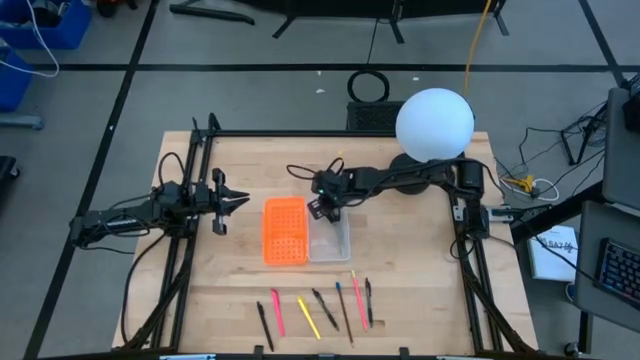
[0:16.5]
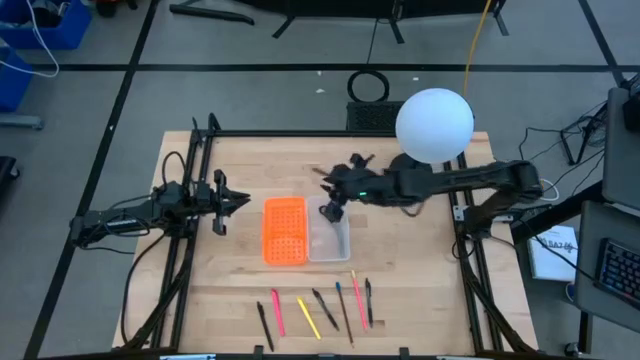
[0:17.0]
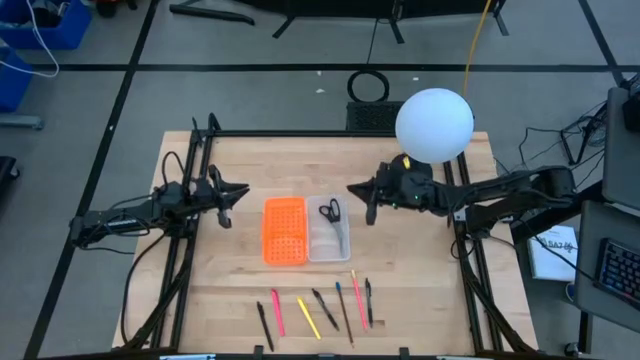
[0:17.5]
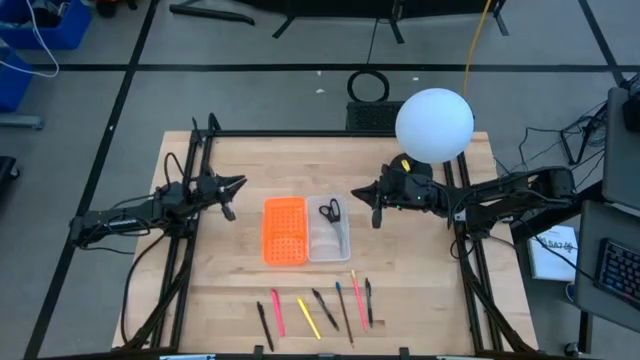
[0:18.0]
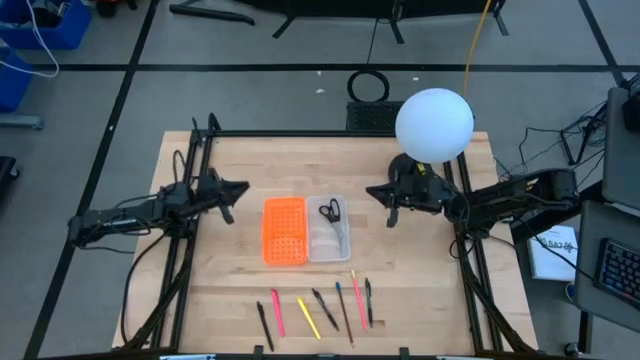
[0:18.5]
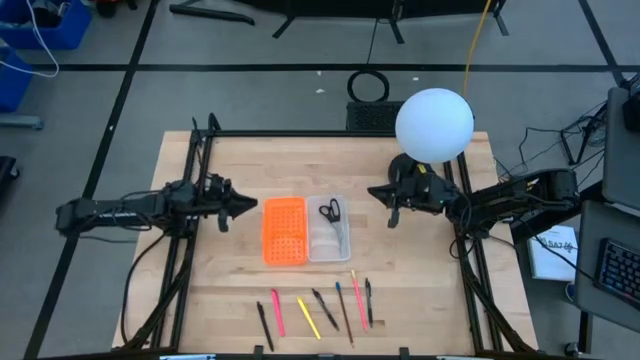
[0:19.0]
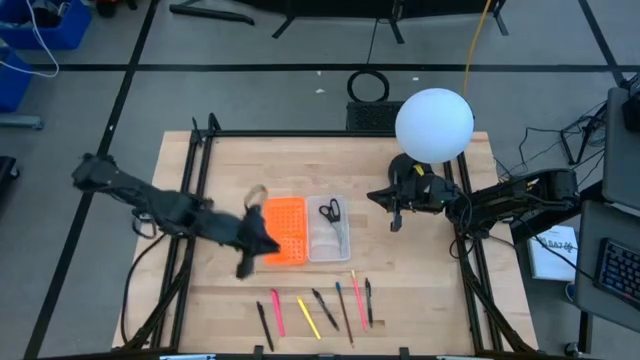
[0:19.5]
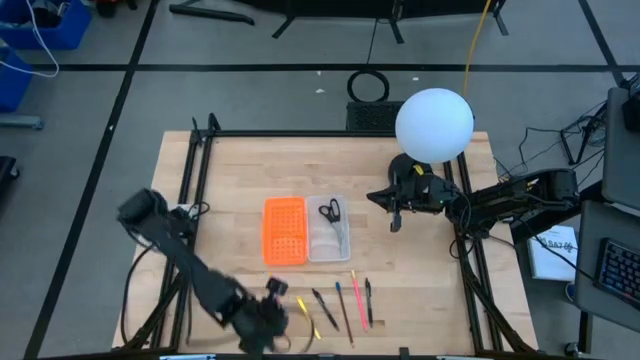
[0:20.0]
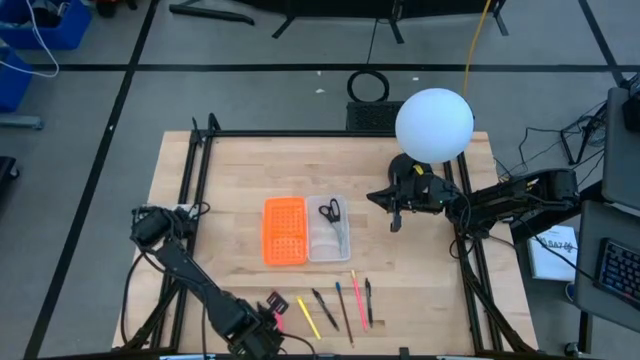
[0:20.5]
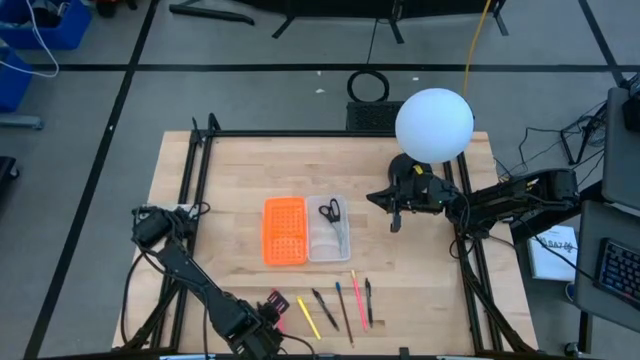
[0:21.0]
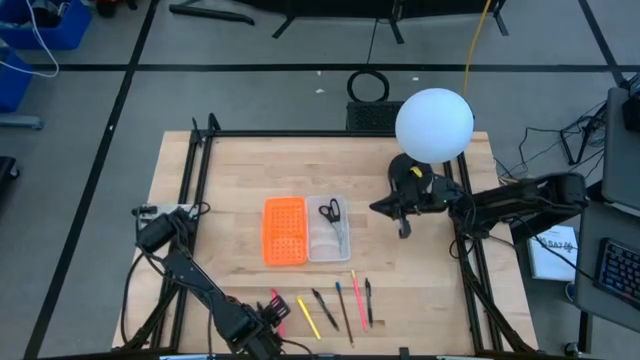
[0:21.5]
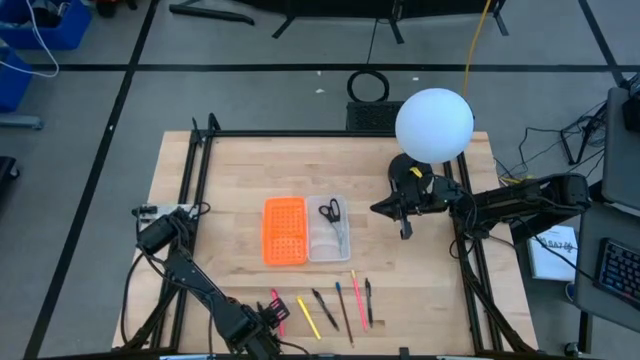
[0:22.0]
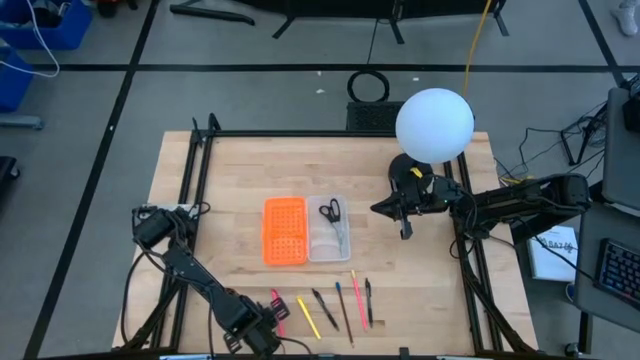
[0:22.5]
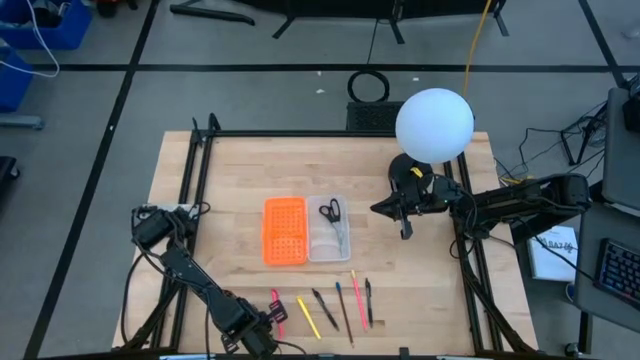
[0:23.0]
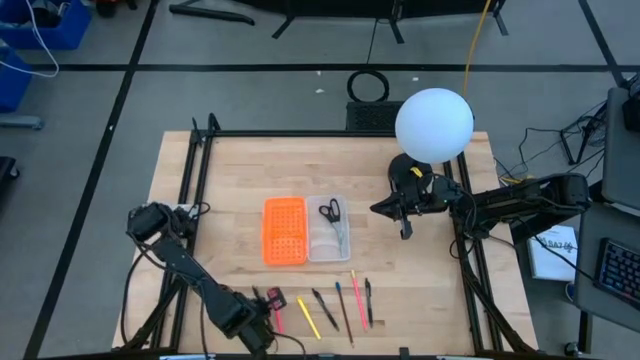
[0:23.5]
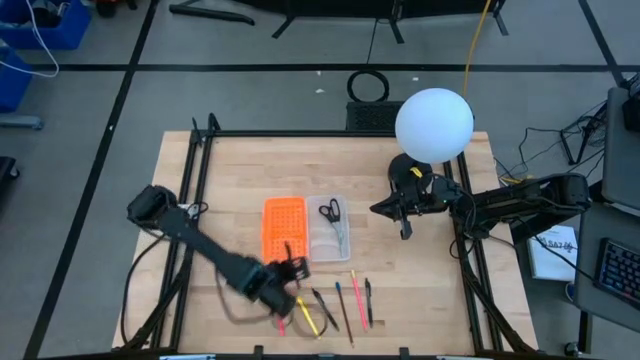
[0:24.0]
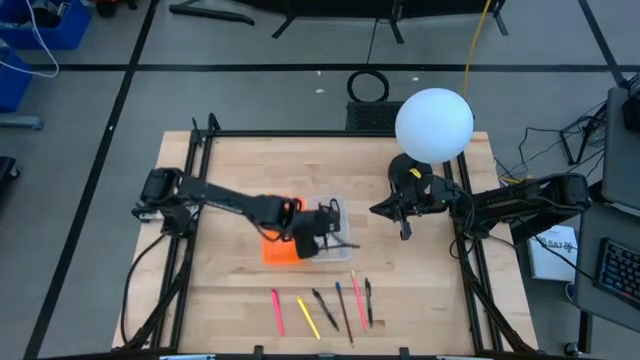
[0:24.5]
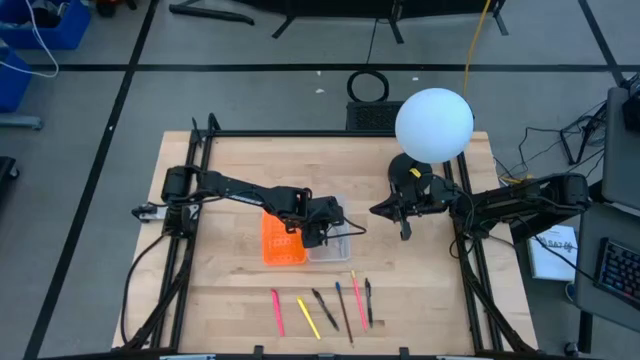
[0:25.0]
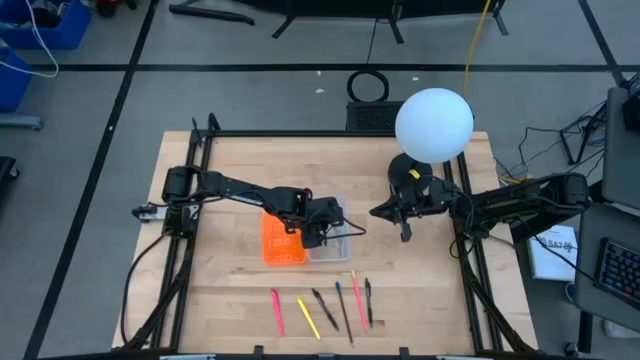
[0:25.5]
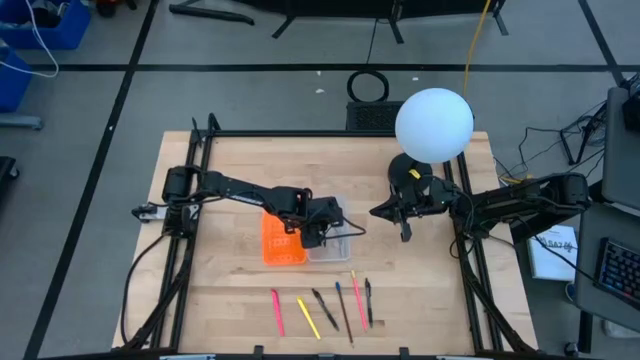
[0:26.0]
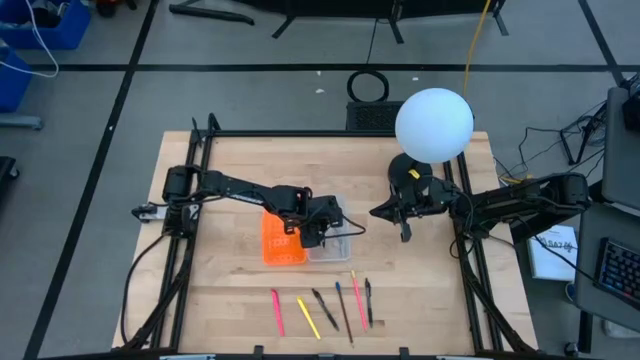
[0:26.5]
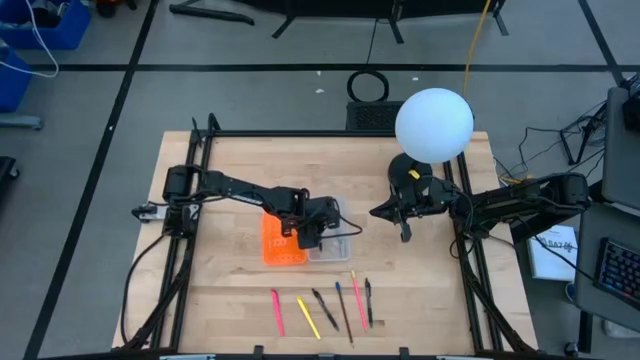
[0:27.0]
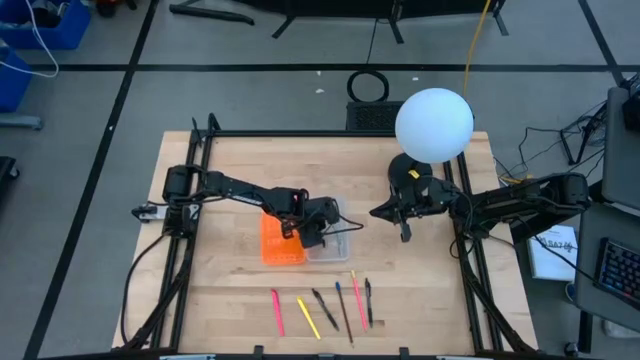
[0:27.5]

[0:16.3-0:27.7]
Task: Pick & place school supplies into a supply box
Put the black pen into the transparent supply box

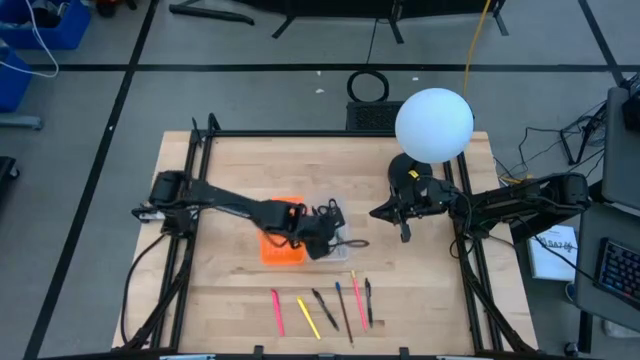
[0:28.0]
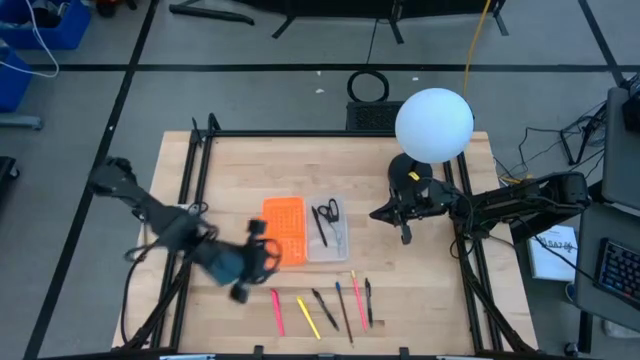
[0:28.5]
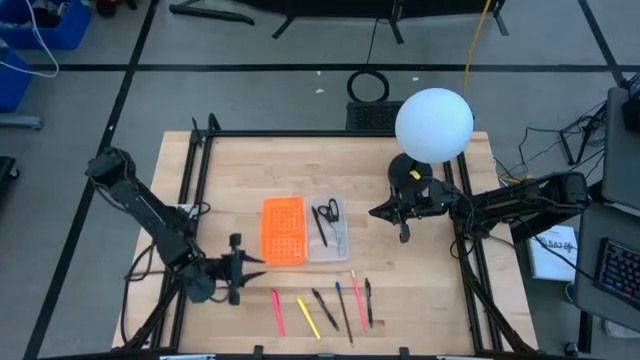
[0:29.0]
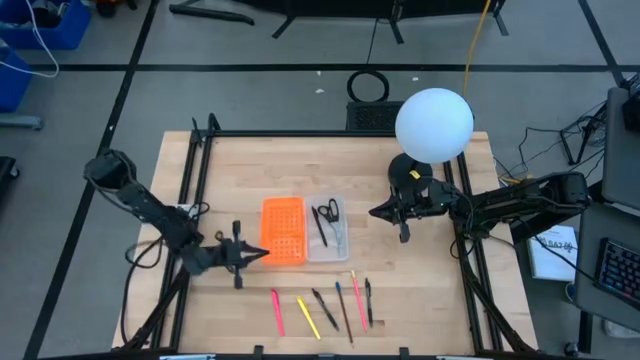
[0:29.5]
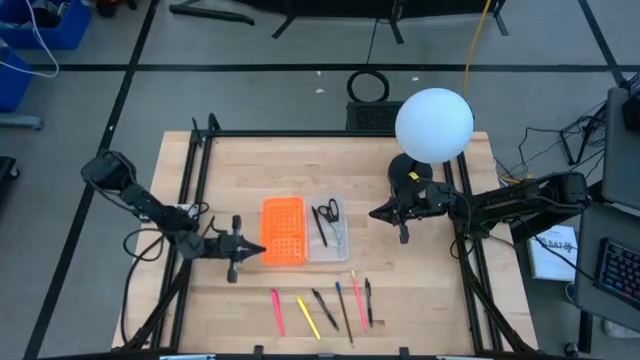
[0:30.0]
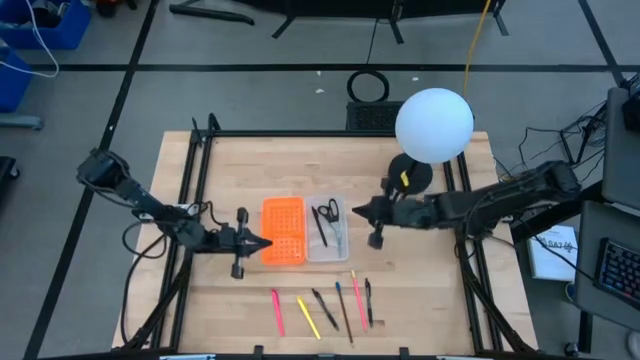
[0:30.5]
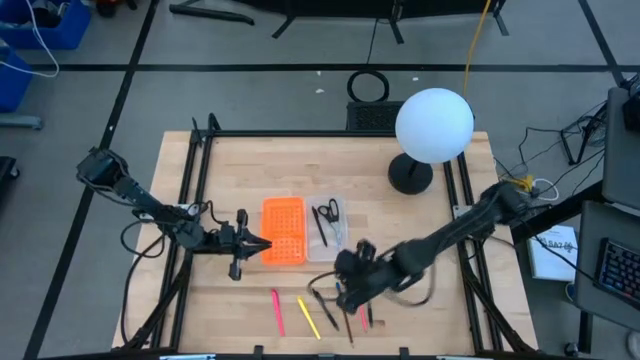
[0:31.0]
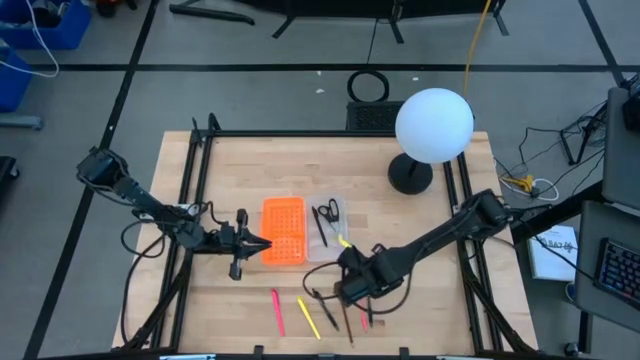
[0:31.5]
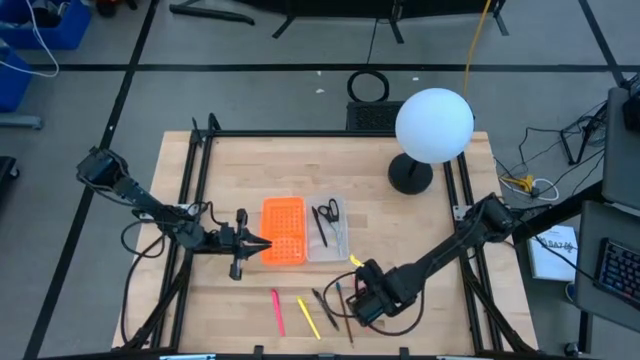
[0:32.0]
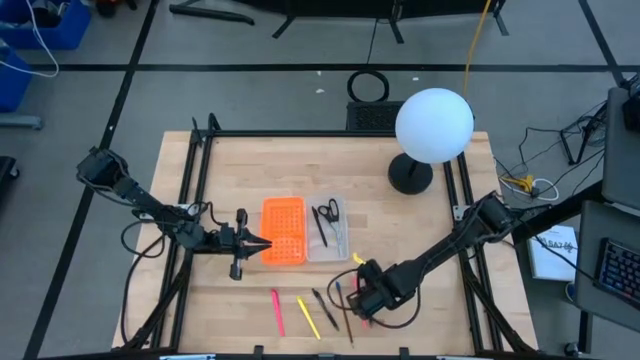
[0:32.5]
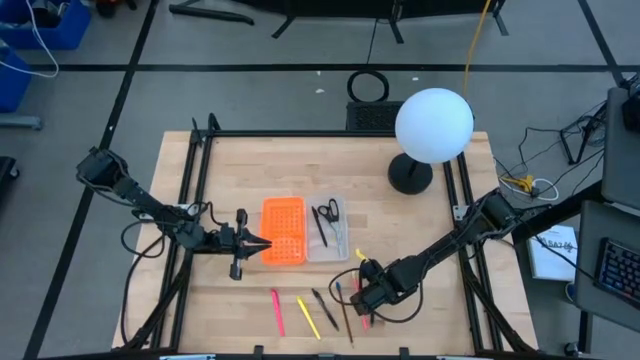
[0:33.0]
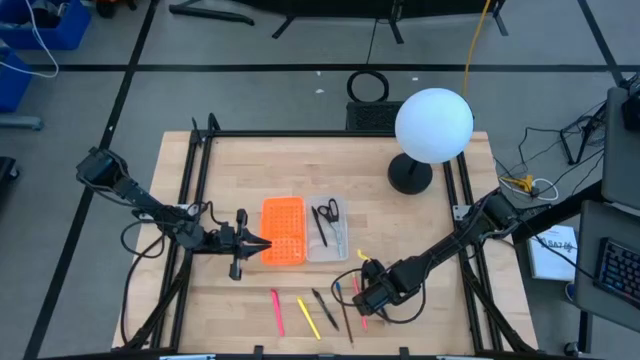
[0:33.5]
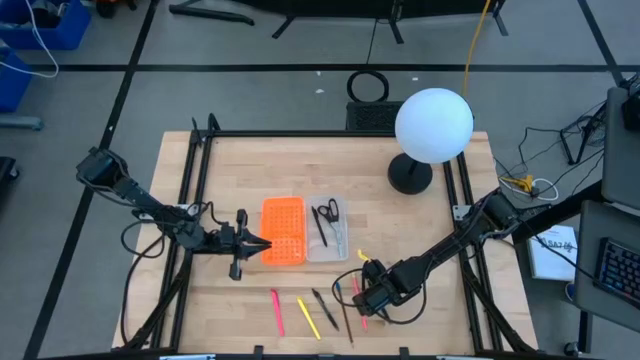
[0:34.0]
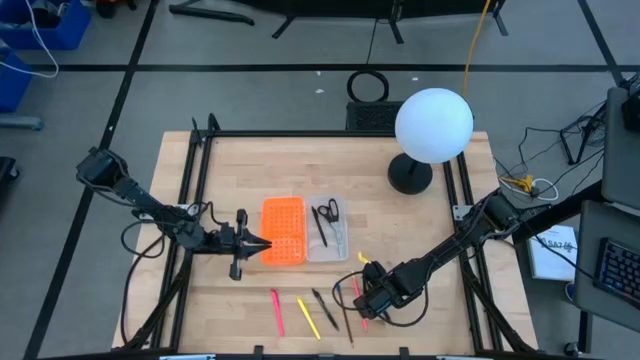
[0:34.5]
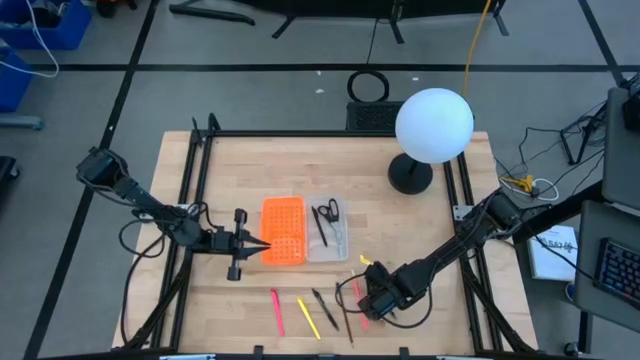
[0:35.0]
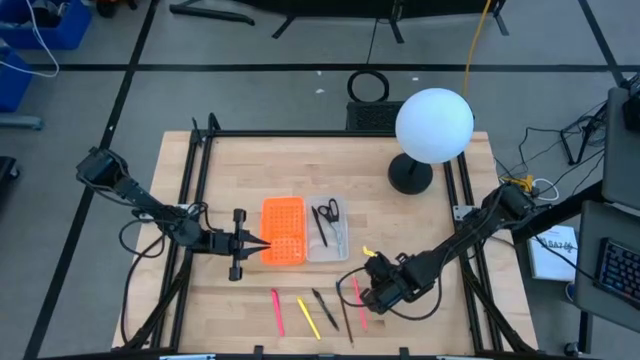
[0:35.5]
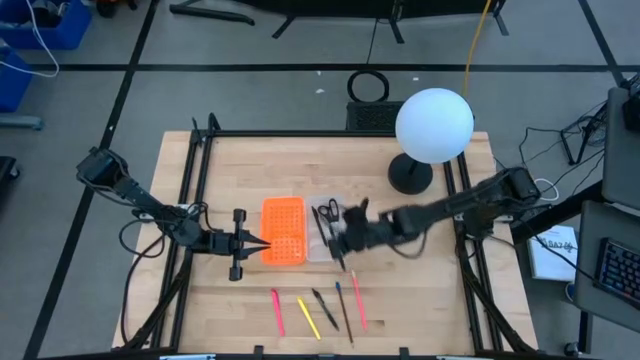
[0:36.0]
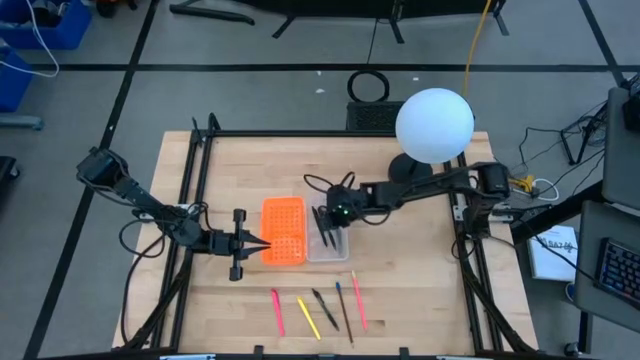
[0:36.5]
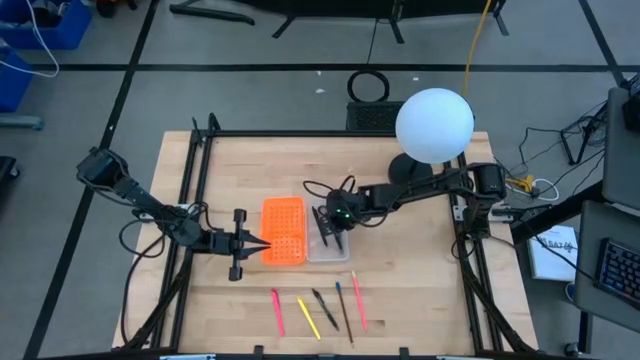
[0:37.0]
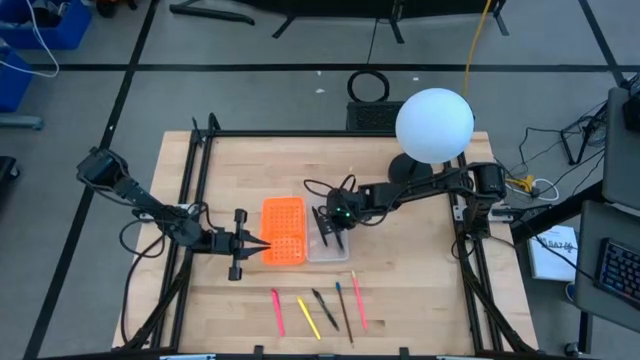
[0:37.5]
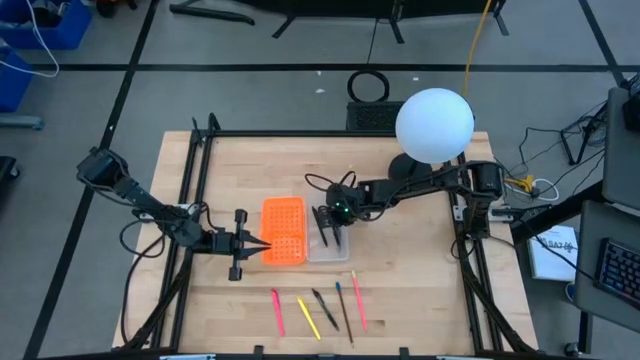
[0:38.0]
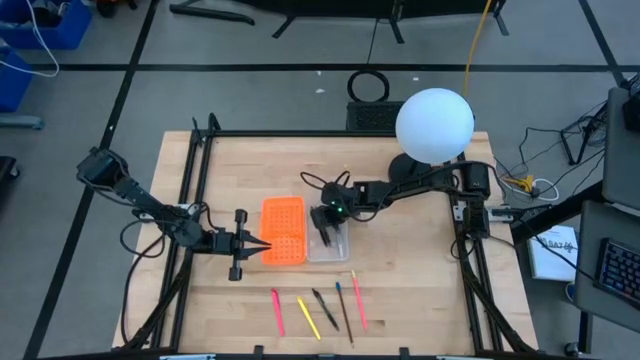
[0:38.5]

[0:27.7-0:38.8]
Put the right transparent pen into the transparent supply box
